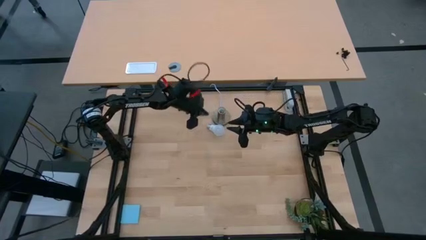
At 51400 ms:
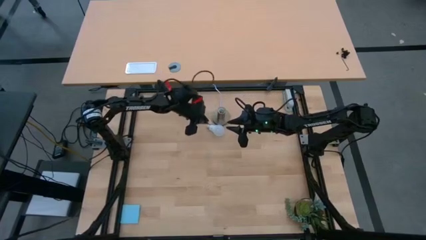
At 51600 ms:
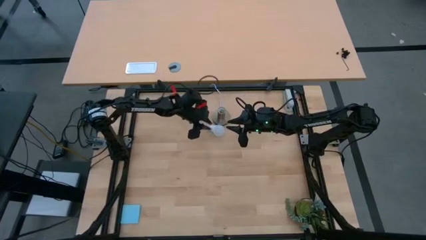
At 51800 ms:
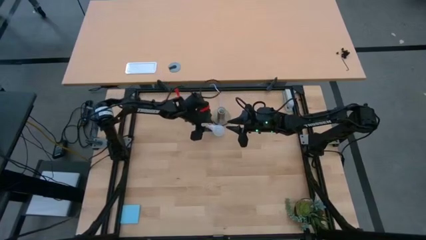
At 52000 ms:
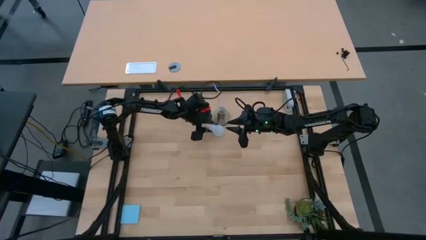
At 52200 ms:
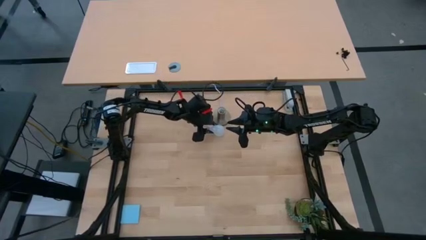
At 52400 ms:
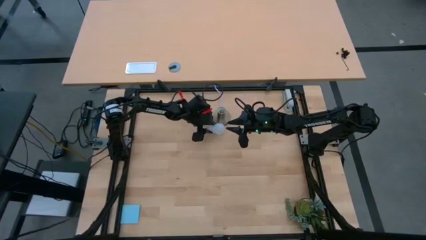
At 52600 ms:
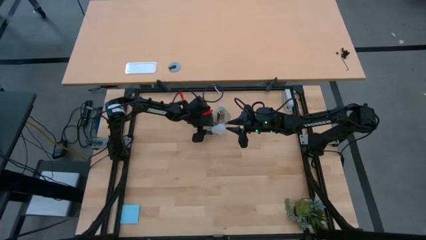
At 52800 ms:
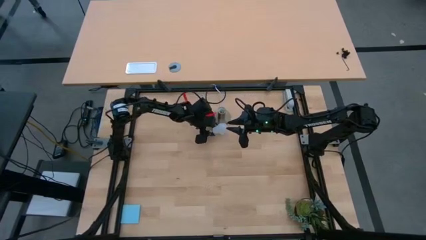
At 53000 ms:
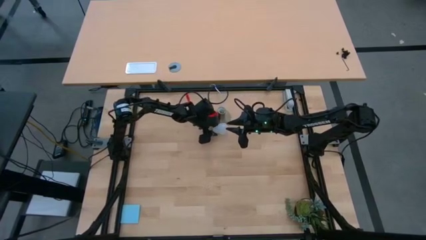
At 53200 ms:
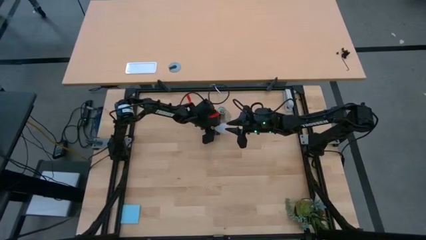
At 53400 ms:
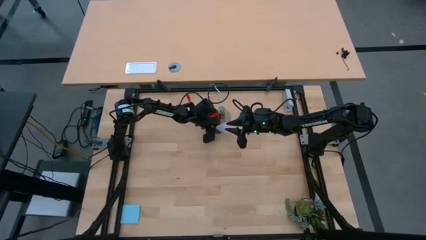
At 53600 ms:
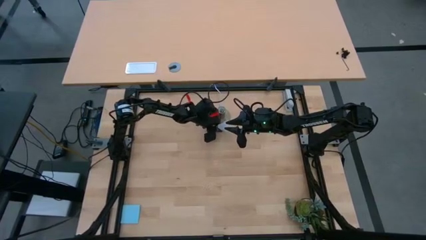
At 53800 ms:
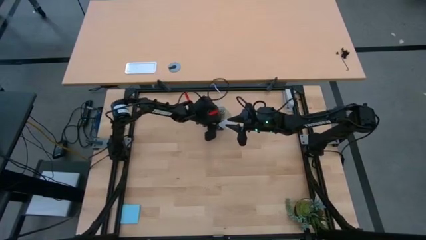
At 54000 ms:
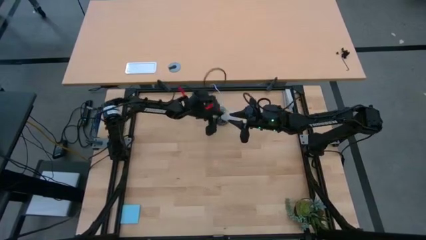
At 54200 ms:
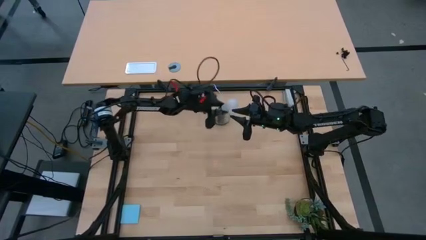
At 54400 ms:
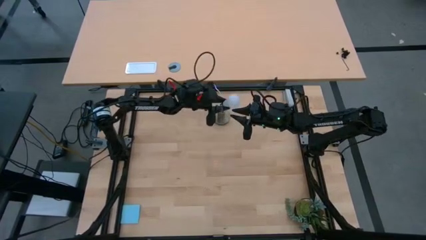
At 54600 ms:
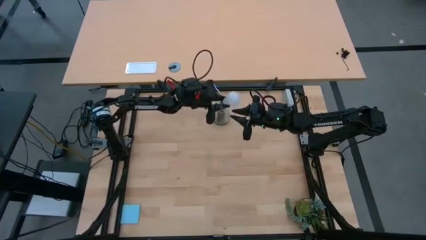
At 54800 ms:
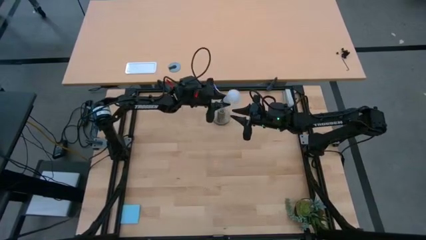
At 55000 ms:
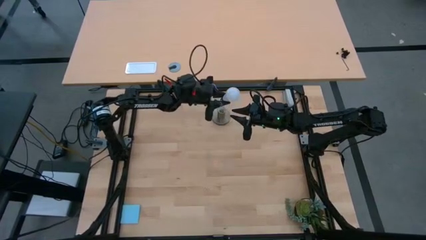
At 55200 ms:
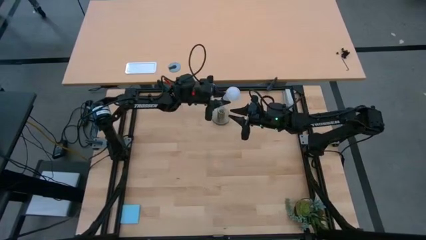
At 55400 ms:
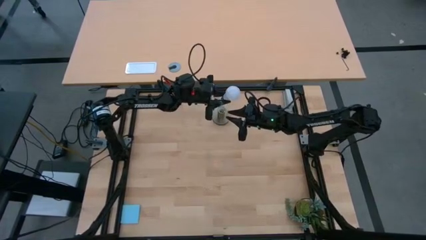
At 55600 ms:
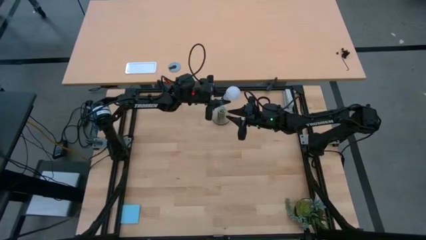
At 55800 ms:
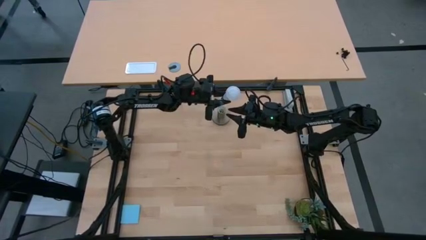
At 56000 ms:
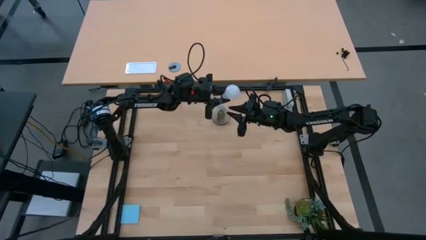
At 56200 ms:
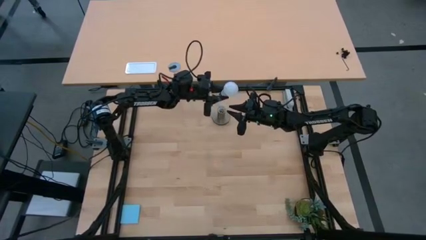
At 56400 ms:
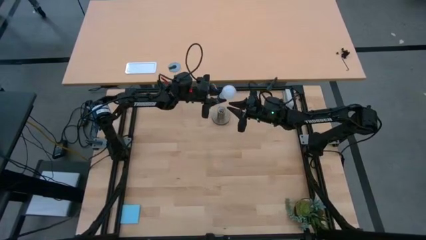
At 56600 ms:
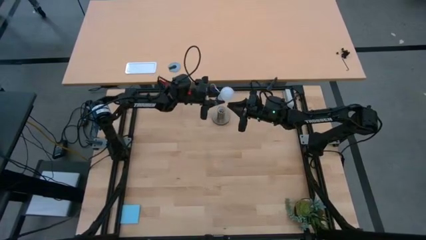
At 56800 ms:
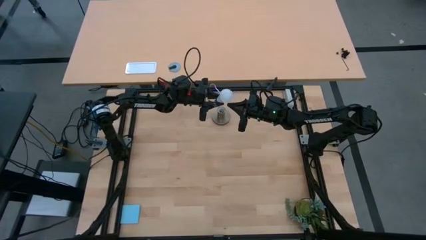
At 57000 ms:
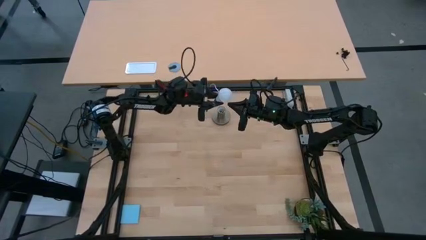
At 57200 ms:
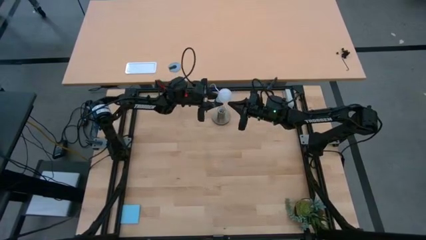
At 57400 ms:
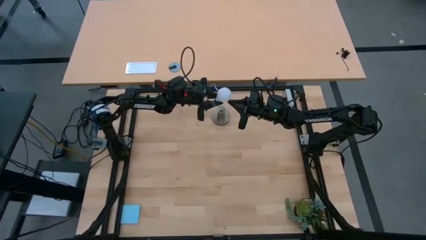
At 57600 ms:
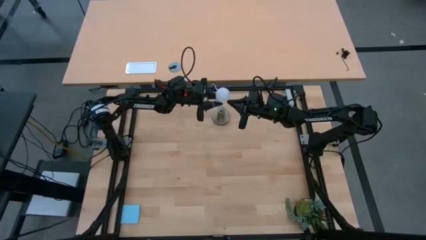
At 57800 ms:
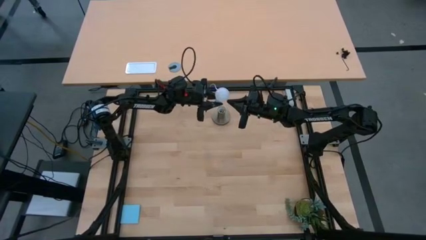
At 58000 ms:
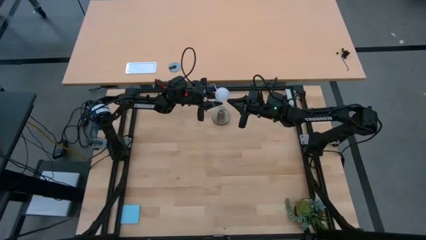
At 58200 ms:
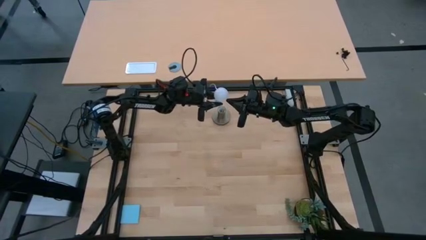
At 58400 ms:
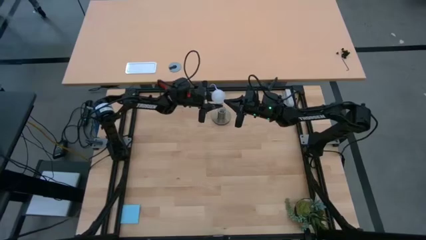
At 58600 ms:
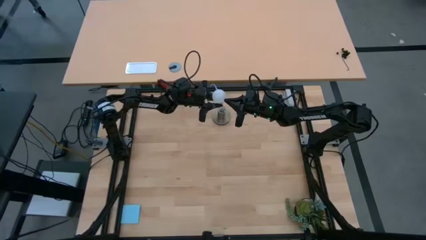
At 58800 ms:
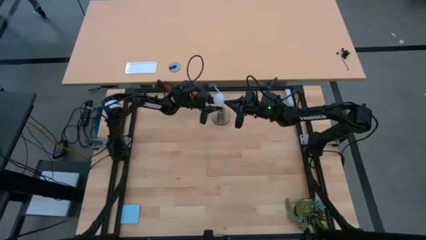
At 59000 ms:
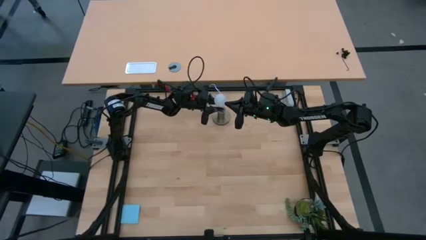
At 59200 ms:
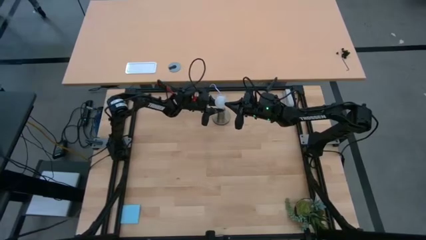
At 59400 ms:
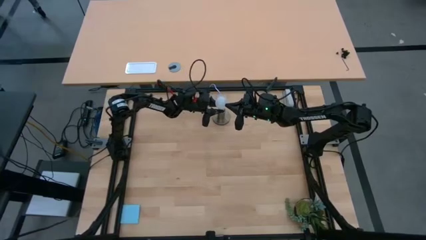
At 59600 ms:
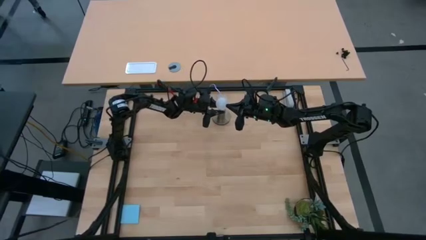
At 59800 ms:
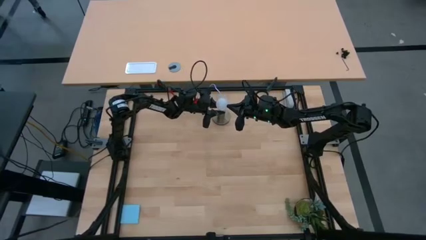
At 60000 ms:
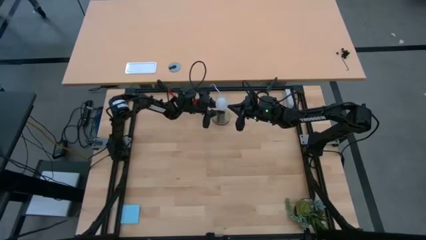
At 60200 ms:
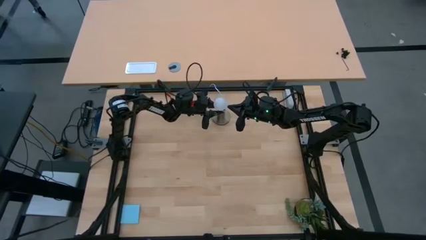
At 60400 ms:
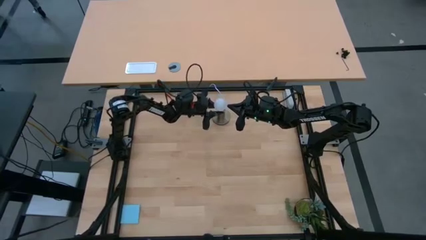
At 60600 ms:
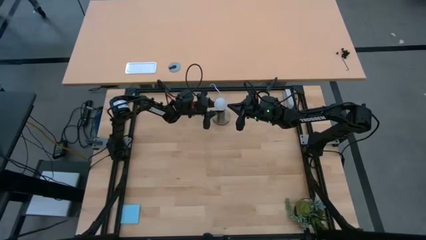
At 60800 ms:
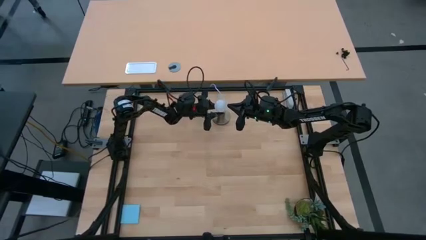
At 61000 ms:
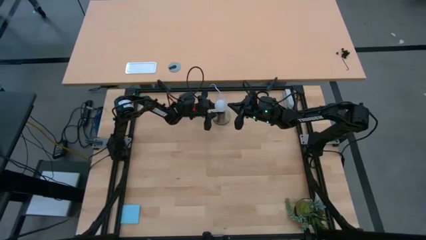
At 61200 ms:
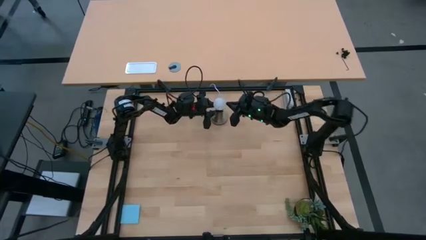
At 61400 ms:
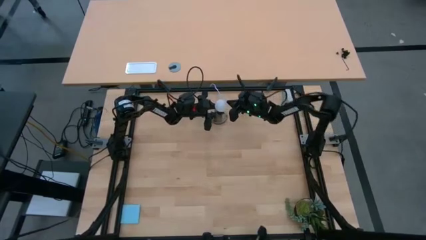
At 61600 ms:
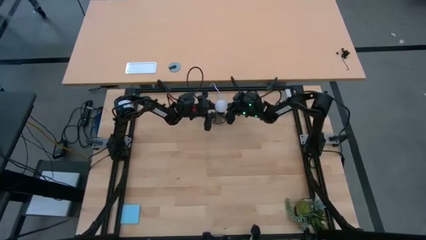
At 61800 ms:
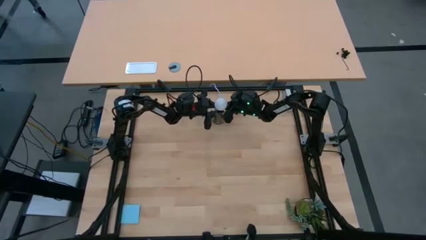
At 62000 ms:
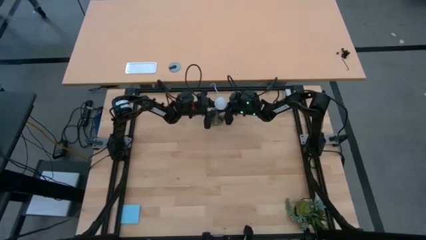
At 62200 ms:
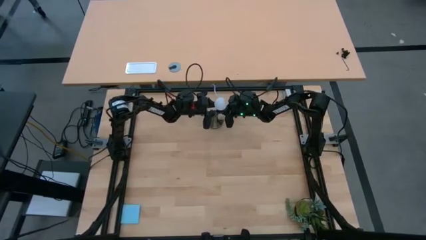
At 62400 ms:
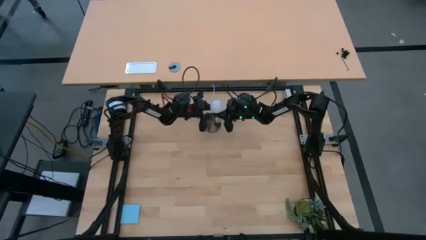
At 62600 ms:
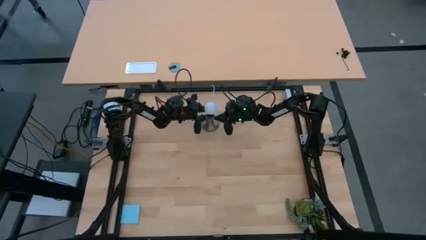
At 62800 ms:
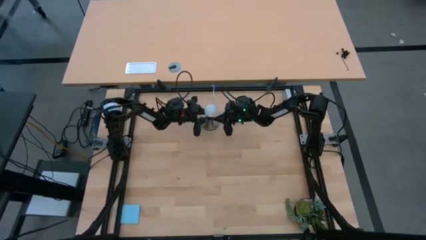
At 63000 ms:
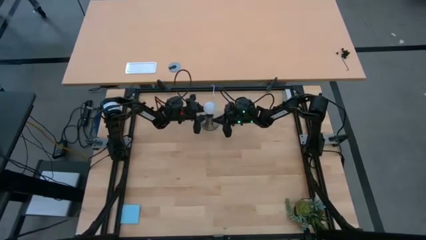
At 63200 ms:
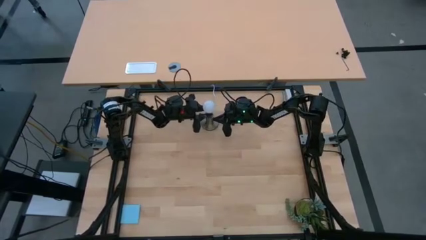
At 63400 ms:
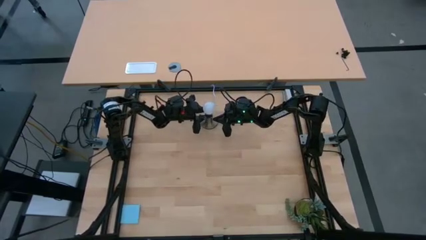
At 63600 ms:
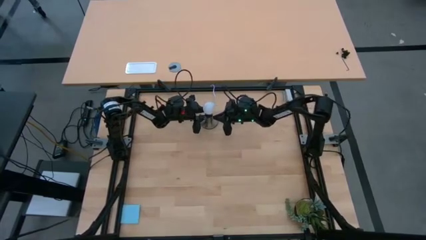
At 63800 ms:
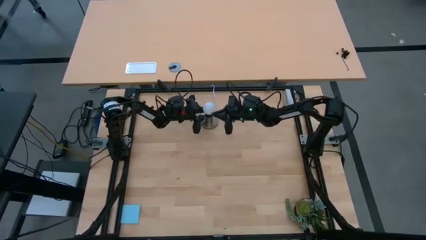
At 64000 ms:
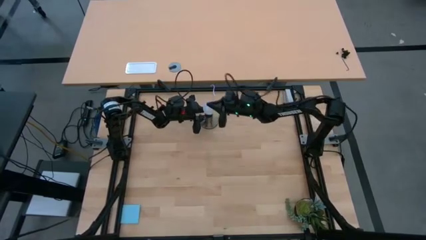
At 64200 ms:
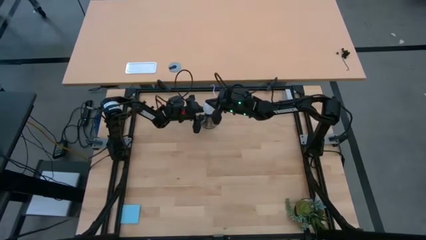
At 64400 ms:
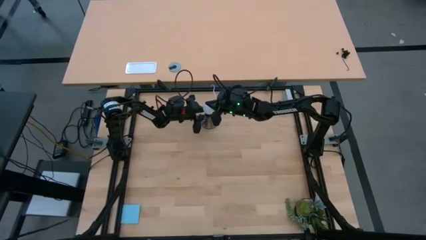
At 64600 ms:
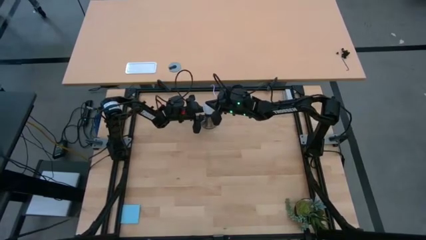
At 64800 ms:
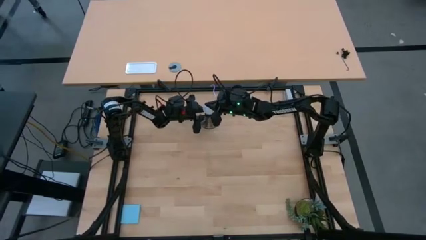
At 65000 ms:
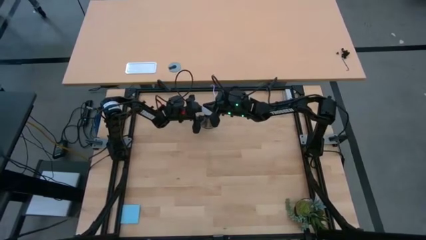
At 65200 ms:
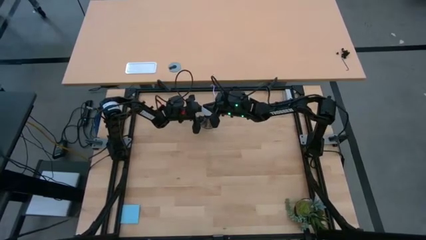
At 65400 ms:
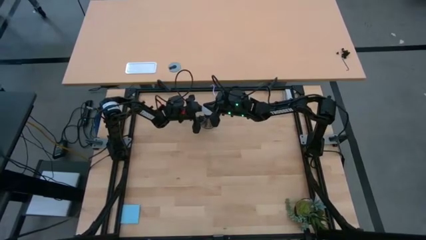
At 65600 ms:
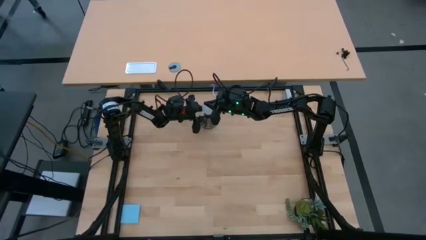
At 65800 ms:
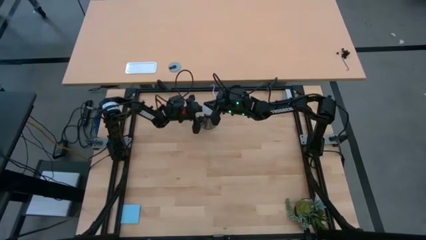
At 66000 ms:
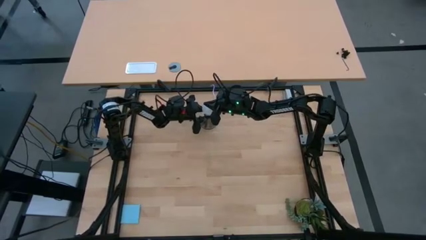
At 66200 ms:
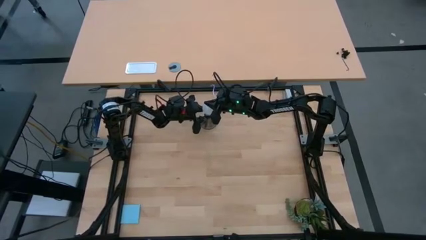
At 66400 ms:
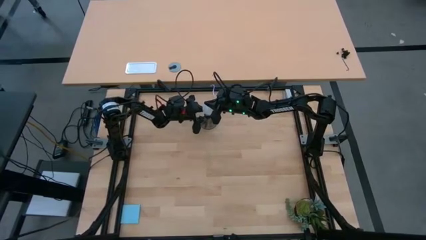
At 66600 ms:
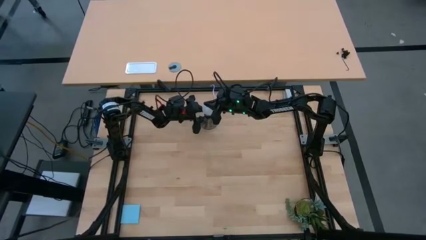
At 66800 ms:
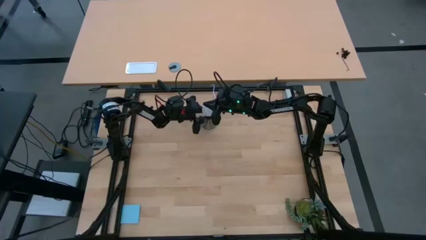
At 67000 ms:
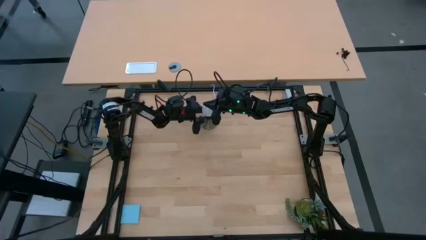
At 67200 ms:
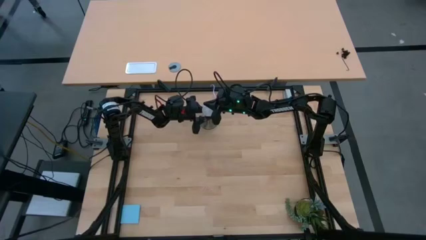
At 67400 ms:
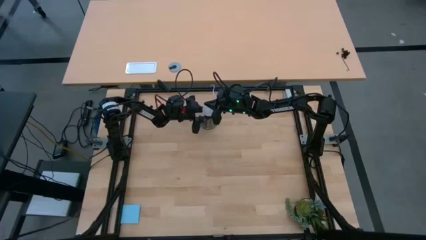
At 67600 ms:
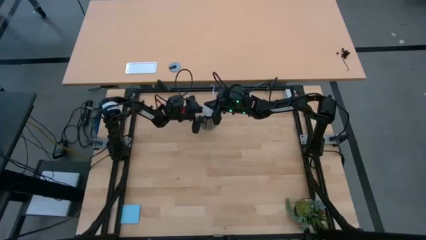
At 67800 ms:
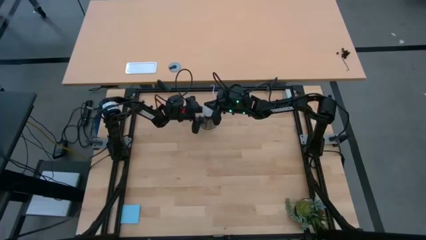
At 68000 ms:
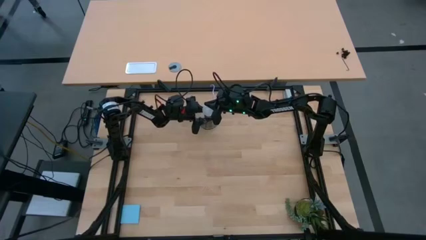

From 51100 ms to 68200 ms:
Task: Screw lightbulb
Insert the light bulb into the table lamp holder
